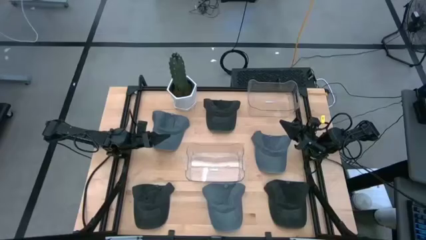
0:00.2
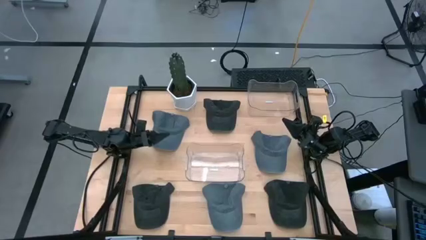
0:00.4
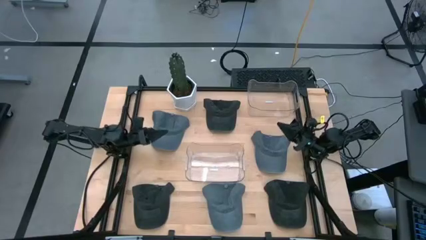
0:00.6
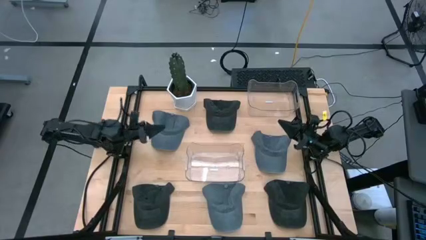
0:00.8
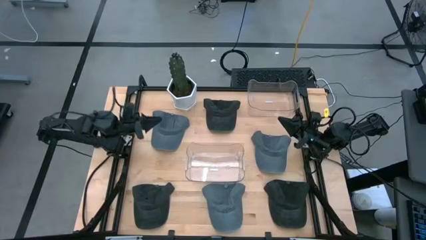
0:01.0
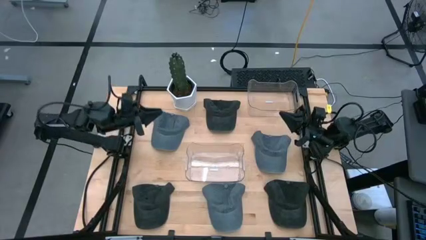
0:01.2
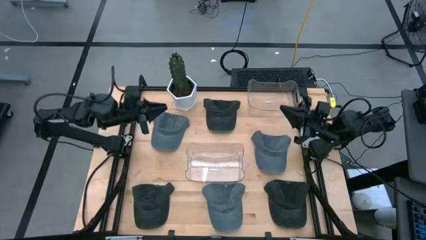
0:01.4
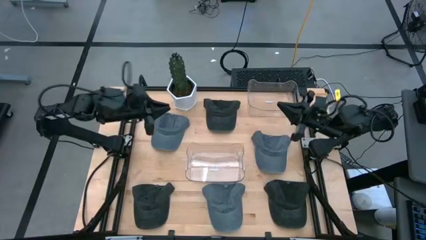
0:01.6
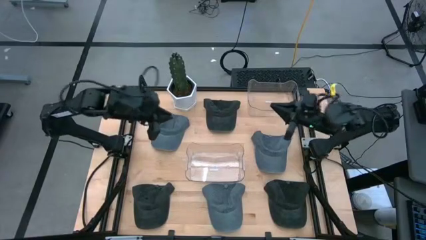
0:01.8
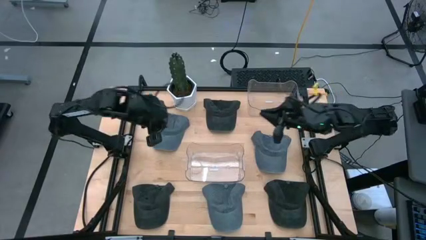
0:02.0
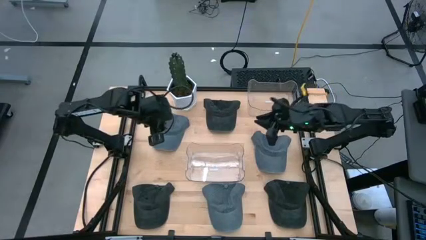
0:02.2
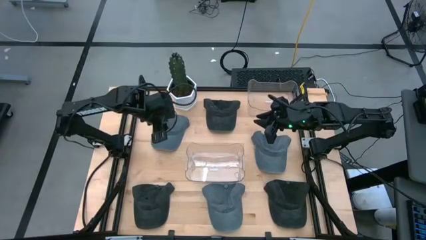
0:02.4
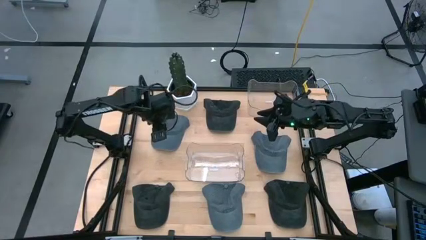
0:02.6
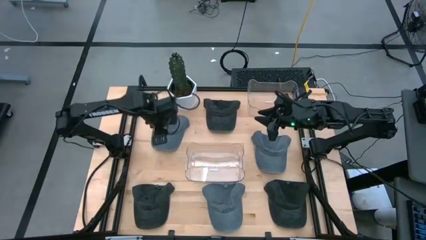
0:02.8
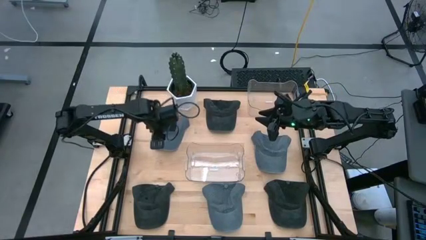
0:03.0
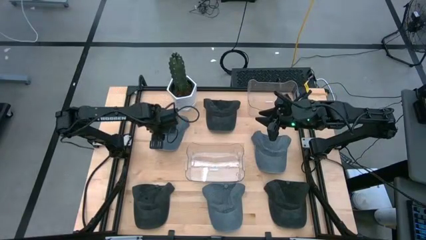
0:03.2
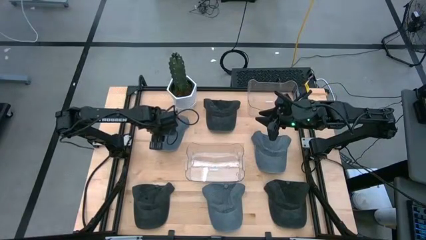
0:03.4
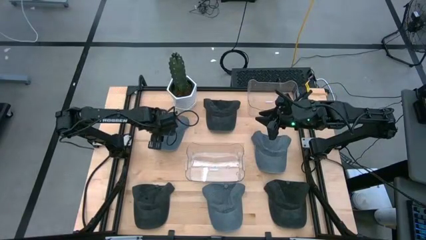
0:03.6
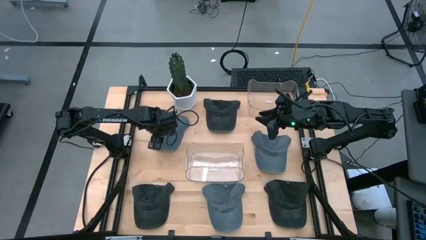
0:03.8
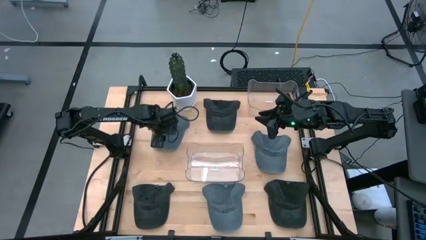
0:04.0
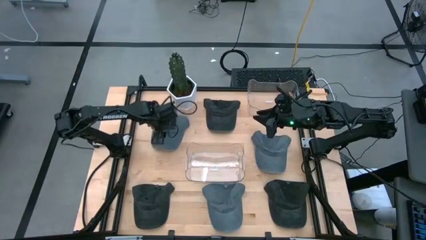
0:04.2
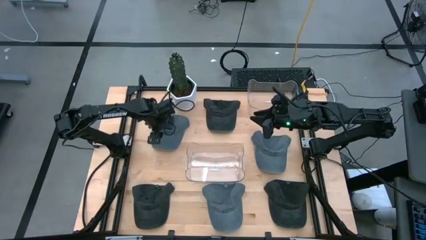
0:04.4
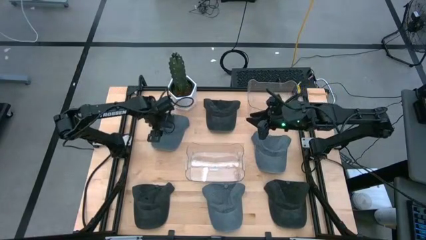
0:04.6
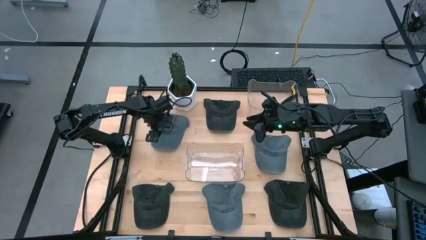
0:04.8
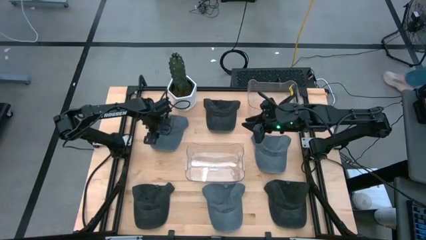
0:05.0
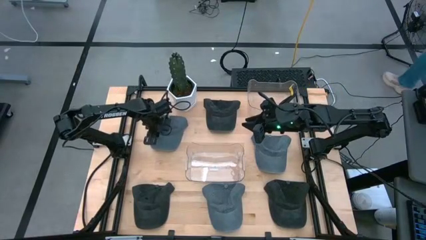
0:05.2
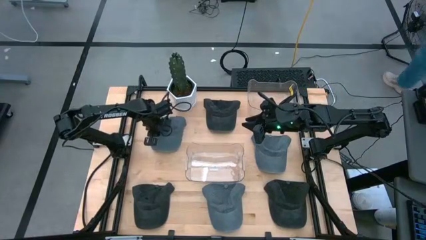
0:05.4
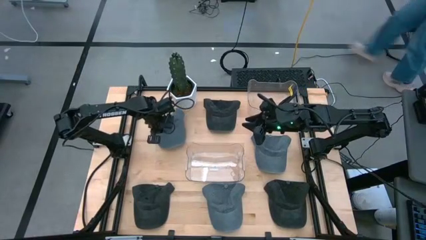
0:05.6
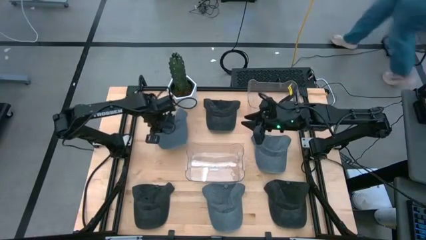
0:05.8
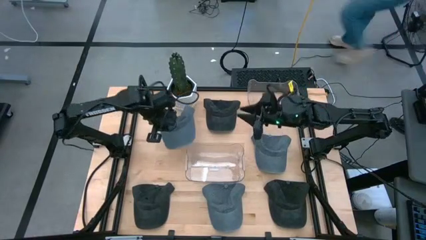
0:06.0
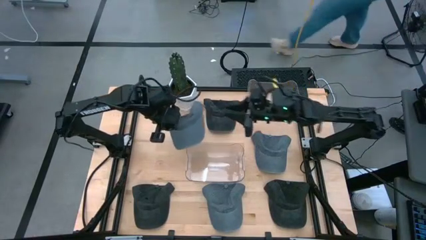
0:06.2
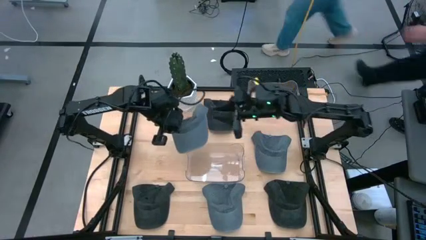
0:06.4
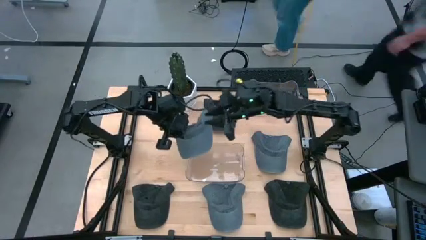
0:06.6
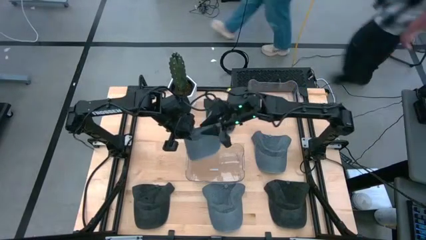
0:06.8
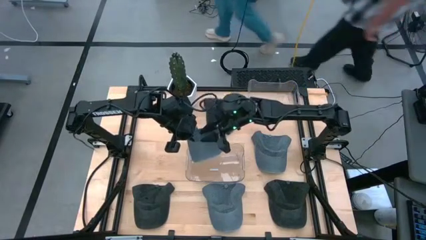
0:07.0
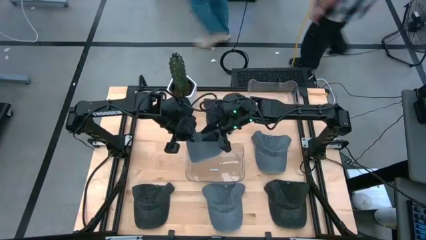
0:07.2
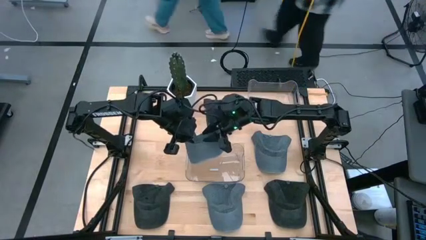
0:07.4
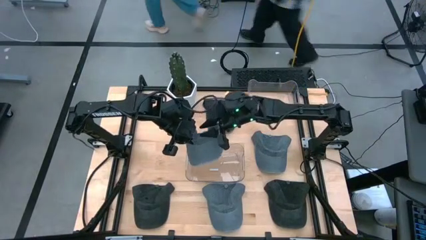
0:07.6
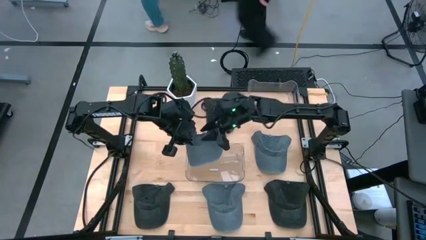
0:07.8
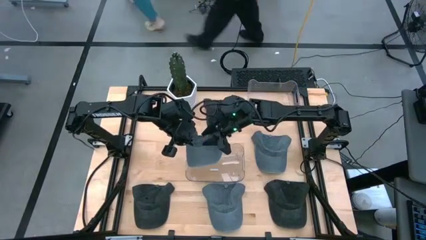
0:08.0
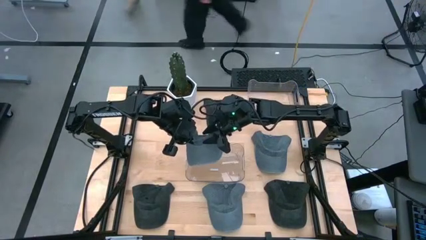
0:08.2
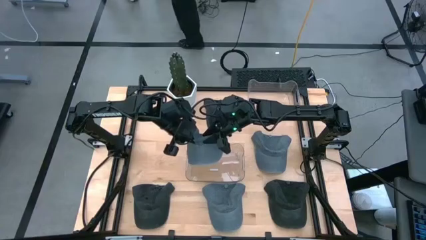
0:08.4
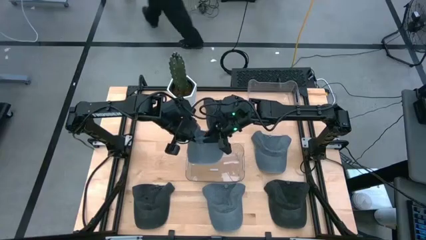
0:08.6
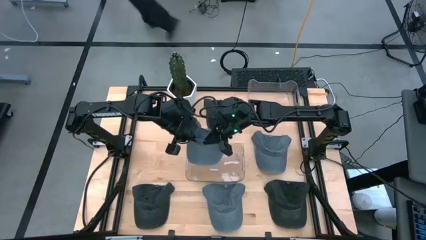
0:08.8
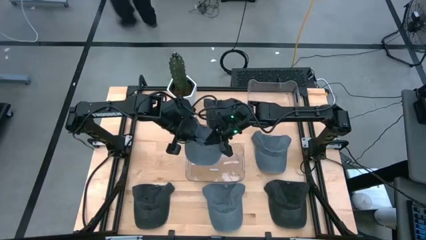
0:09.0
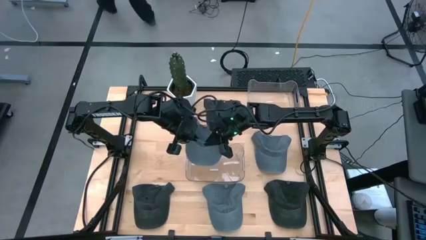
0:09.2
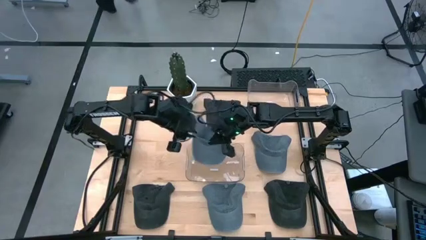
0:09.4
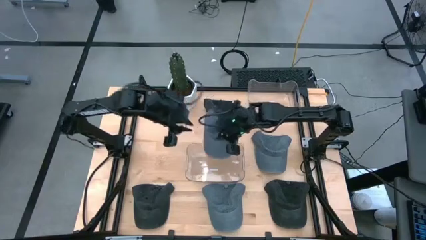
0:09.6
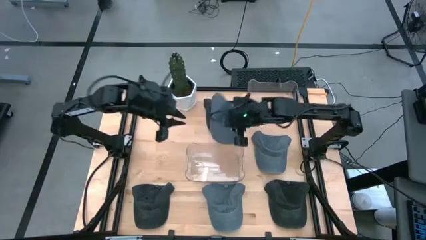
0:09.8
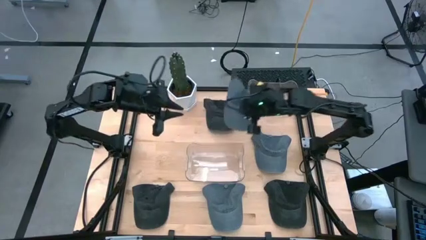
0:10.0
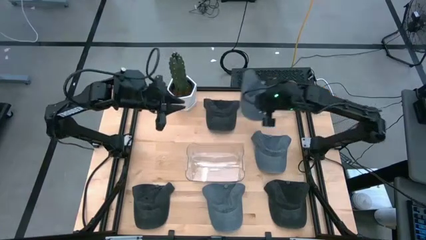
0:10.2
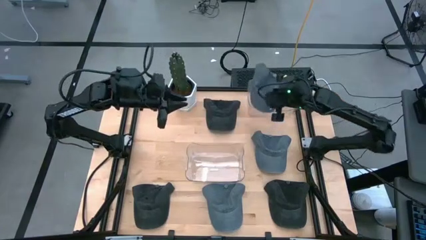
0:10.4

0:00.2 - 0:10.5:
Task: Pick & Place hat
Put the top left gray cap into the top transparent bin
